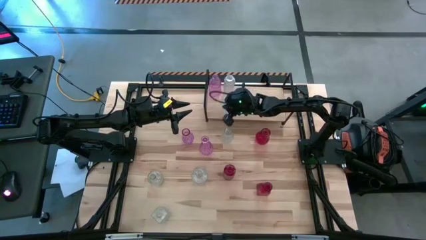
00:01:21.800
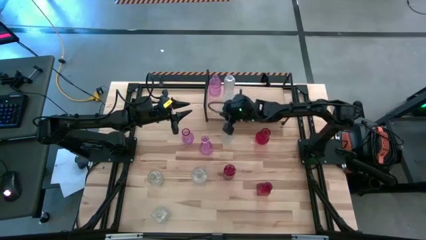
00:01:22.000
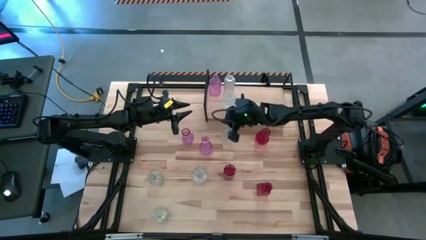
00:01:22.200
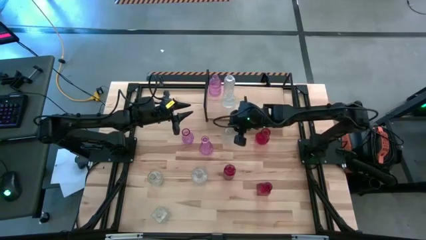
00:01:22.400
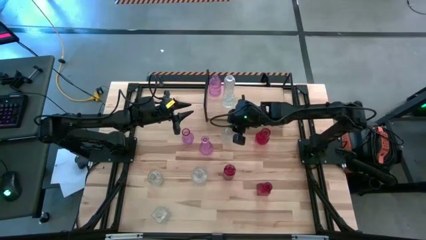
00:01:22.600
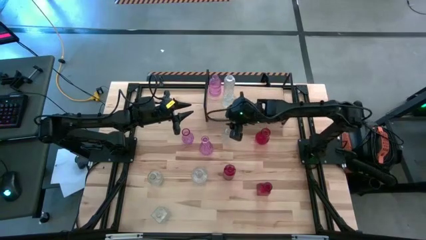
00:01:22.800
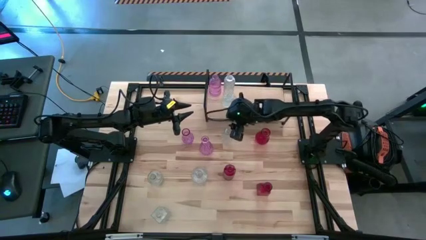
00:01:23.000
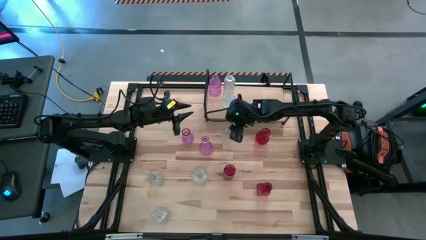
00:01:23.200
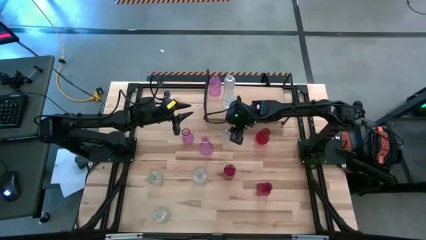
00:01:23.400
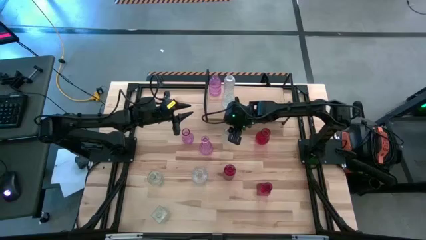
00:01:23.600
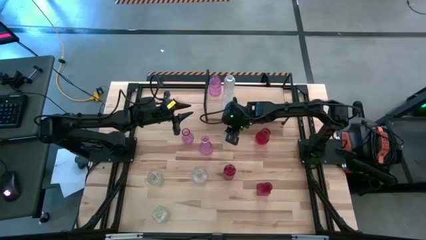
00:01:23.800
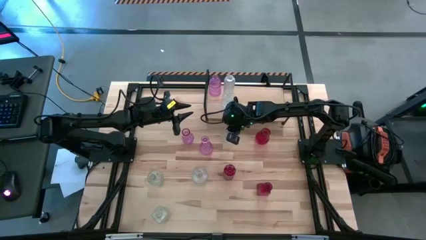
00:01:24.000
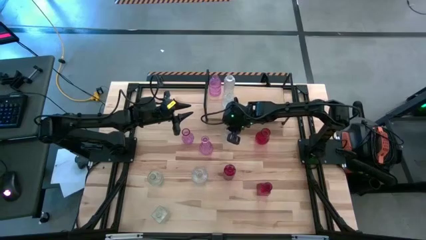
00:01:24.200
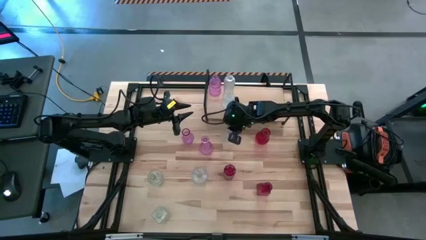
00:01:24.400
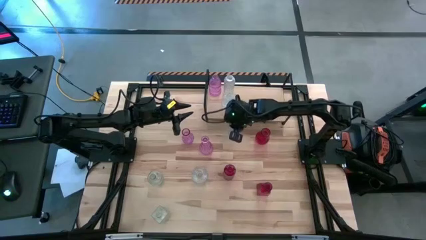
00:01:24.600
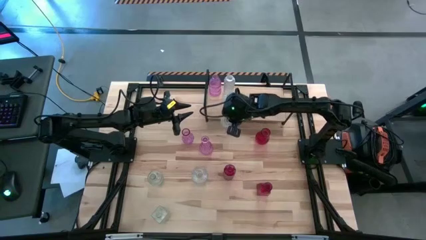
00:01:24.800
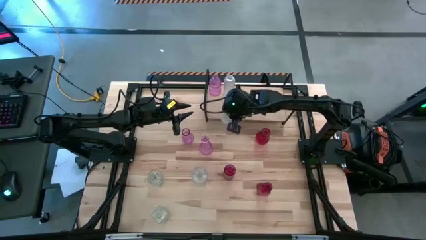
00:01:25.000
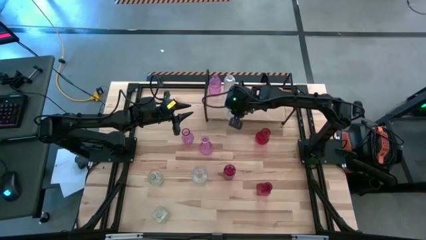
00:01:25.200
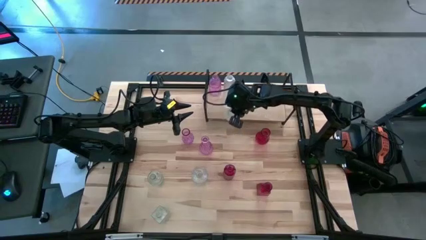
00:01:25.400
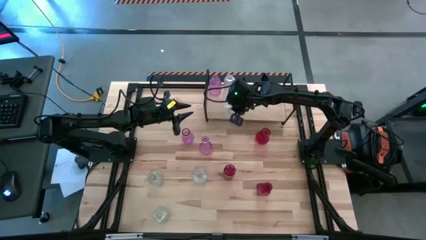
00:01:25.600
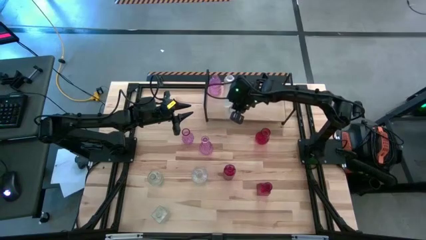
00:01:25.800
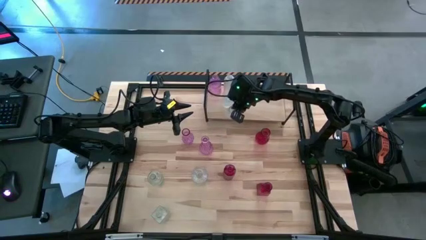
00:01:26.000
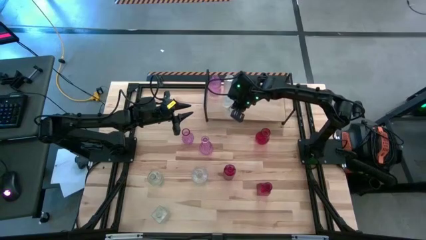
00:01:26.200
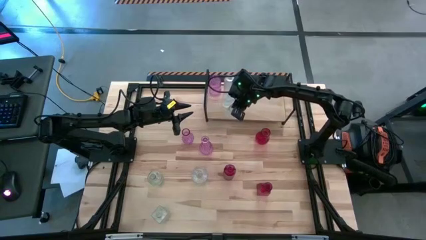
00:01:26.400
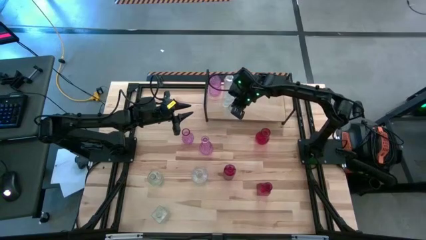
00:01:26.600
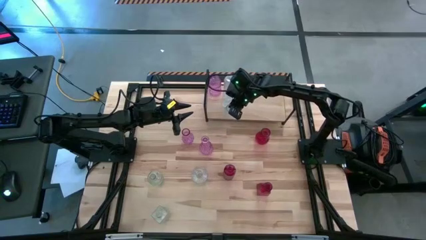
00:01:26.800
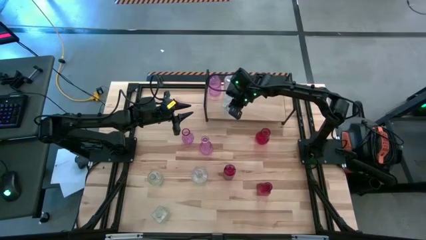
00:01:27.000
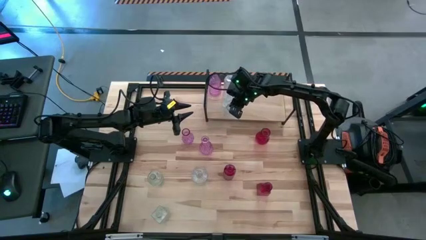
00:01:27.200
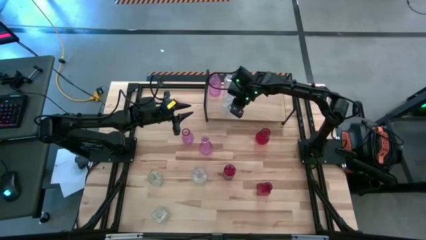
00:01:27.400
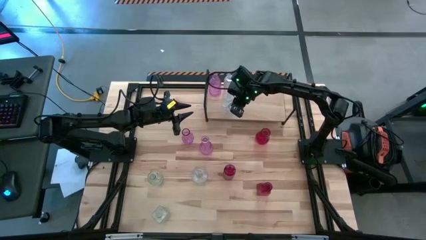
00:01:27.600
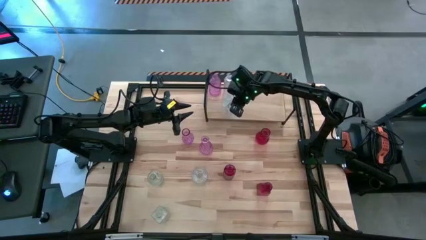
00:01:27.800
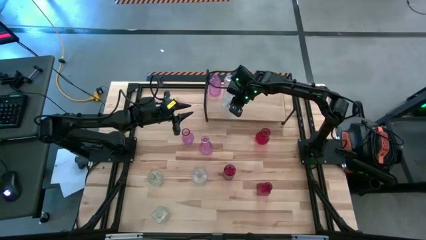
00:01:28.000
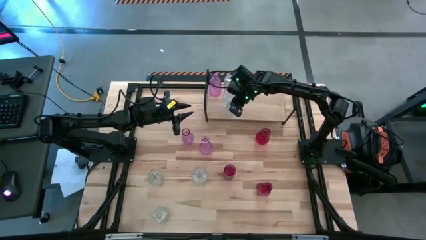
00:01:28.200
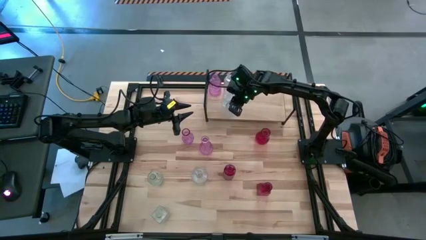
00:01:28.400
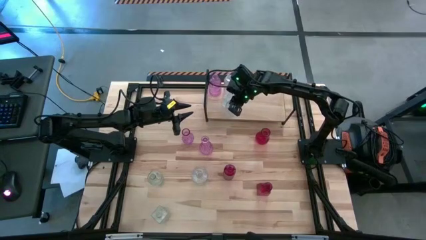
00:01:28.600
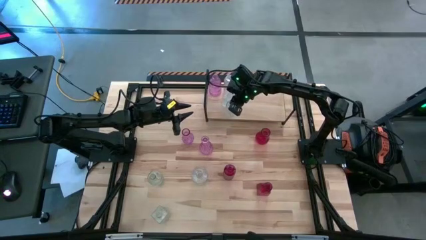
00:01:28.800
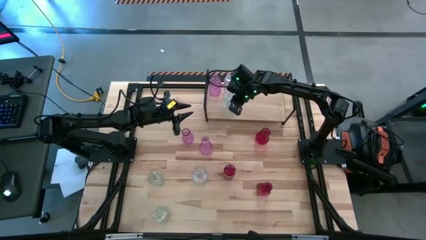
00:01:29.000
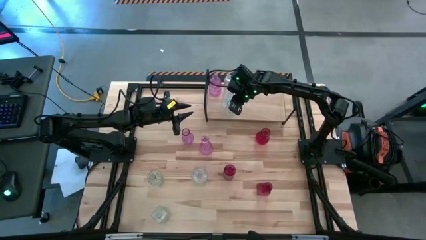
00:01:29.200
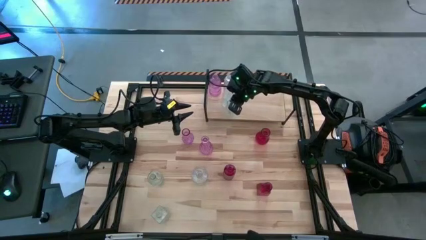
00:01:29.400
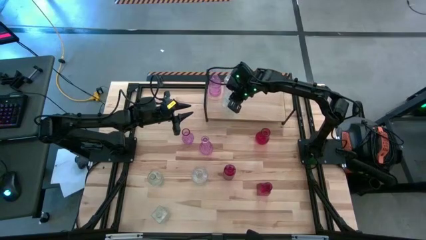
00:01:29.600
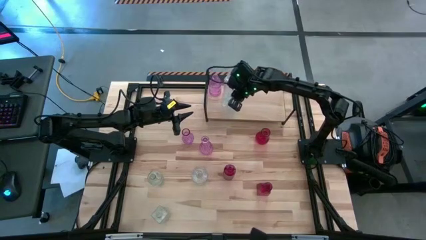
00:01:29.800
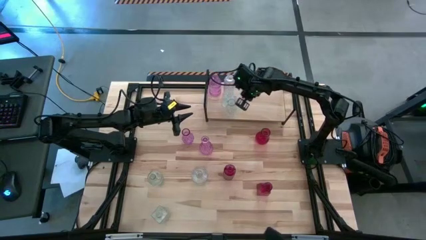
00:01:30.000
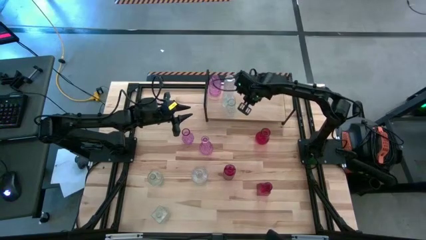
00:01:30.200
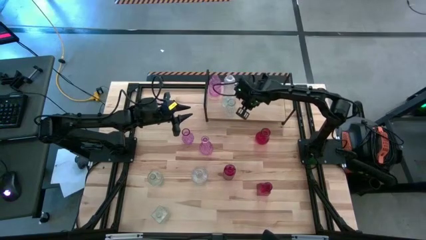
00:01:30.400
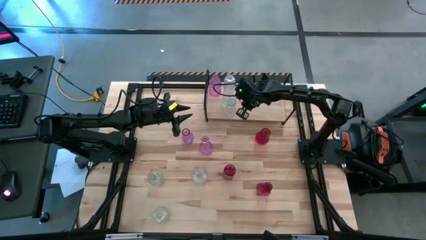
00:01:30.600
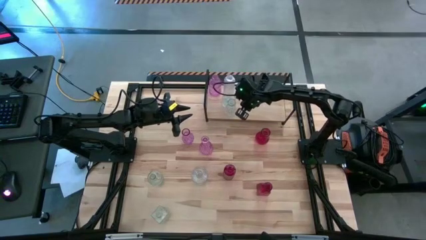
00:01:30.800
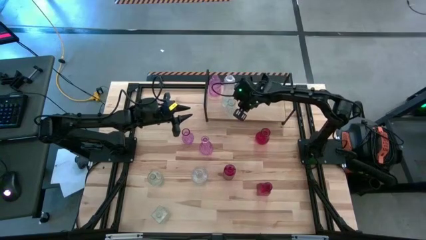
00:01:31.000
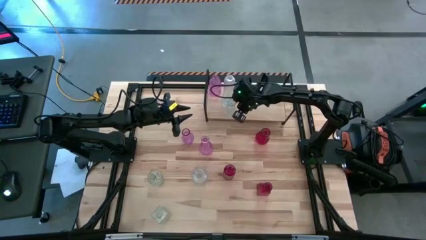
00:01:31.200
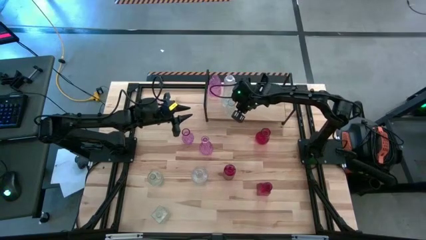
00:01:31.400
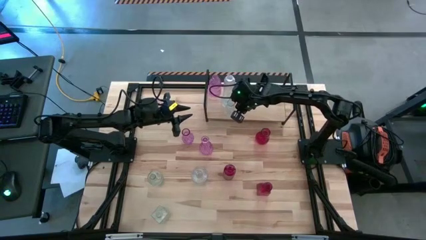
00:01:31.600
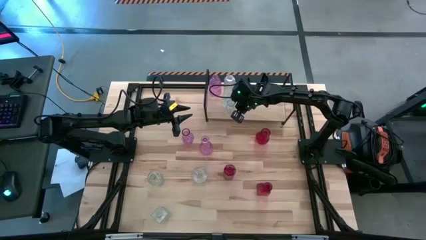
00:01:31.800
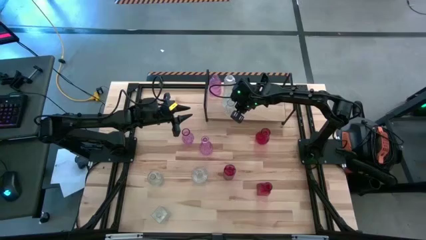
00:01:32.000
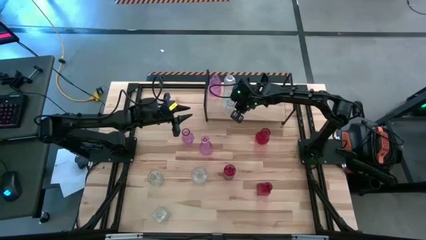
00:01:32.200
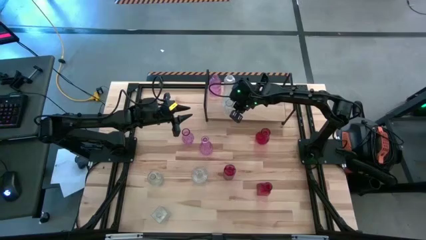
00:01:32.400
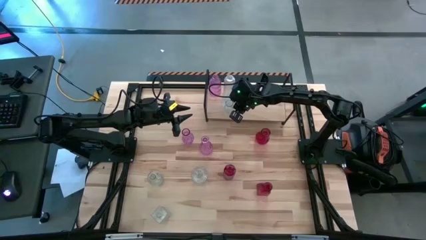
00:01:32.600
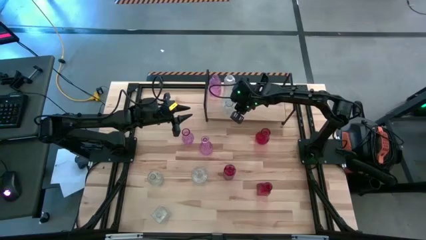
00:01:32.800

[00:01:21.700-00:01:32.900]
Task: sort vases onto shelf
Align the transparent vase with the other transparent vase on the shelf
